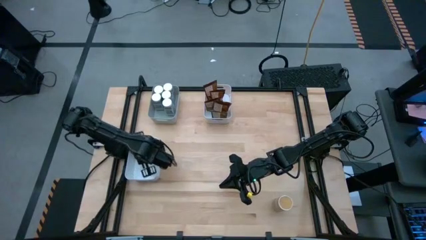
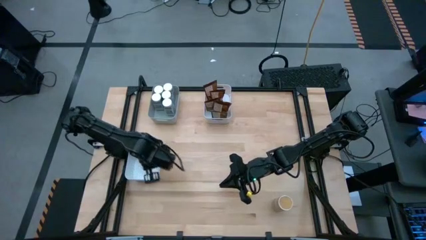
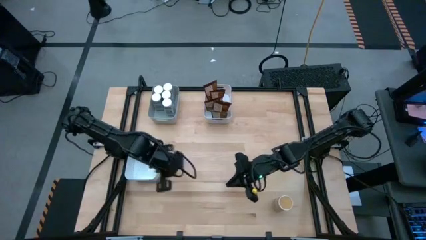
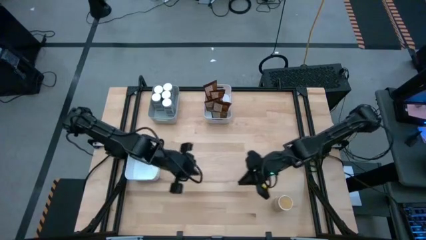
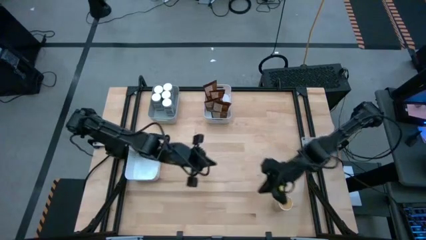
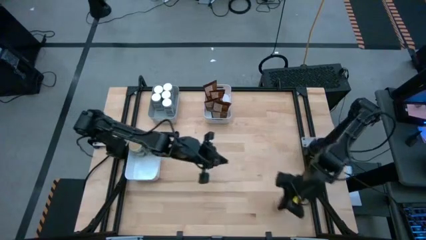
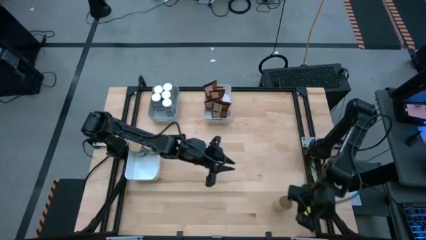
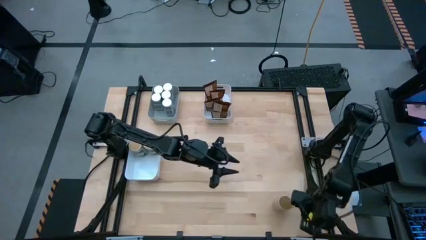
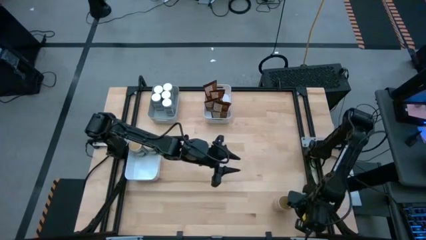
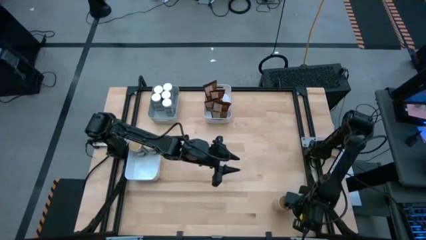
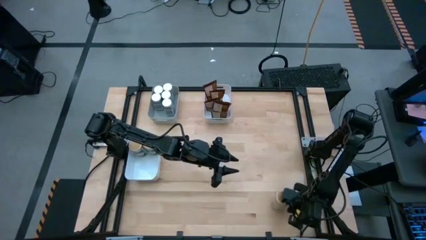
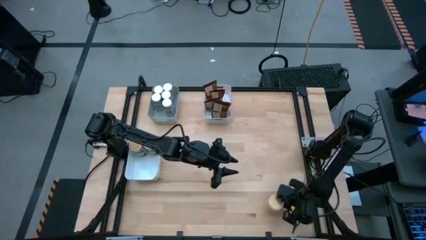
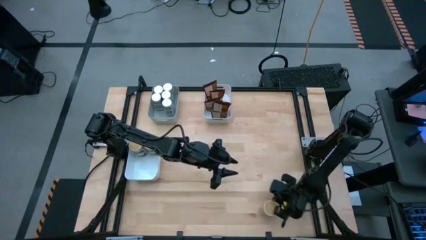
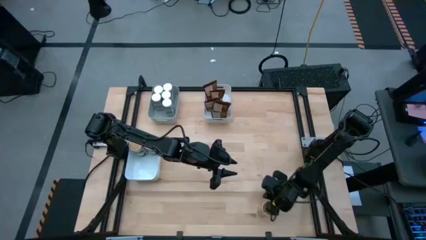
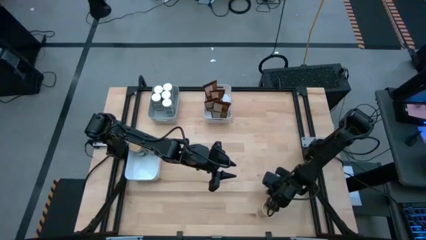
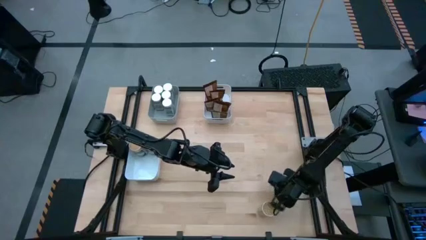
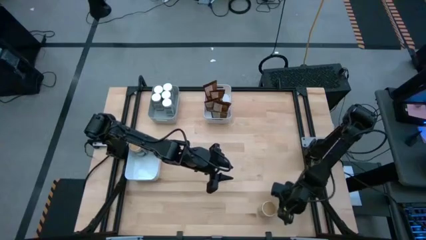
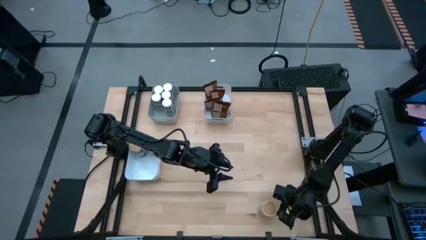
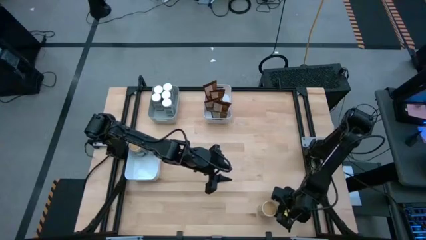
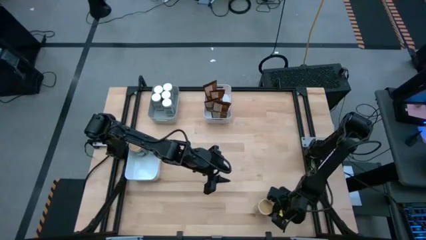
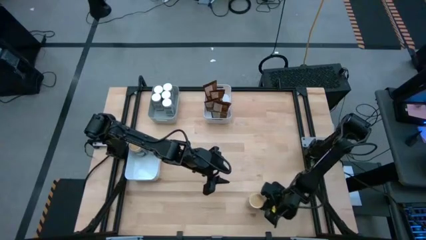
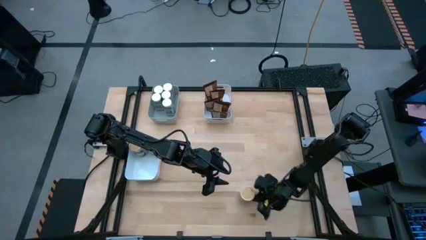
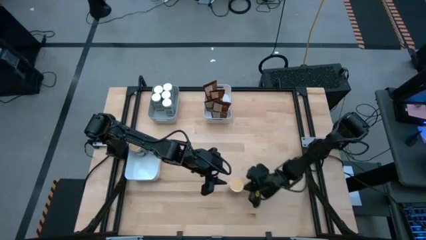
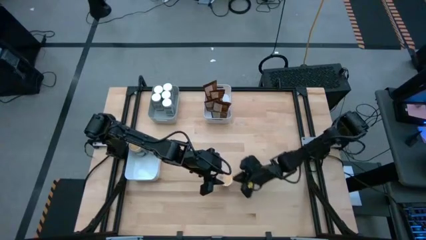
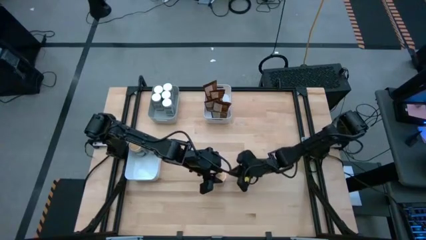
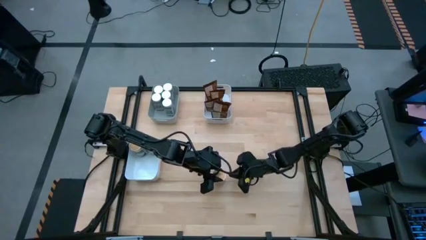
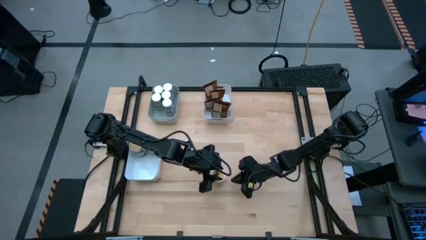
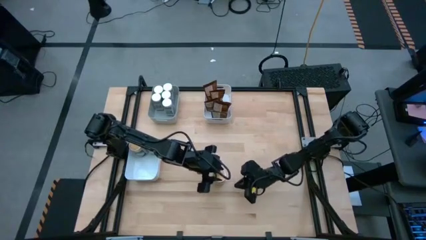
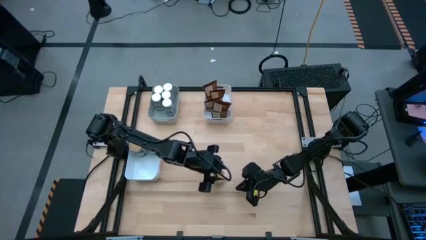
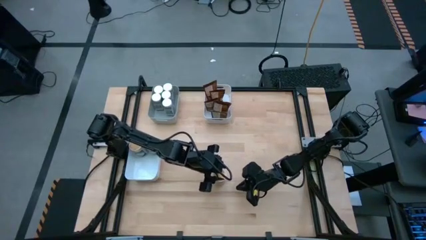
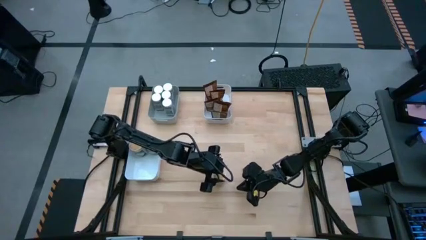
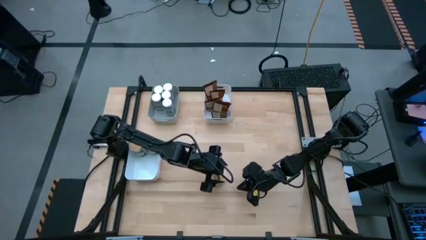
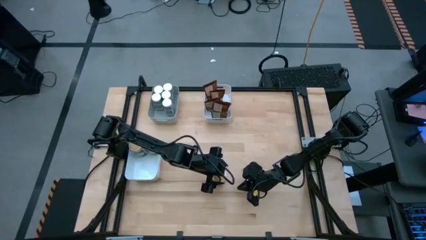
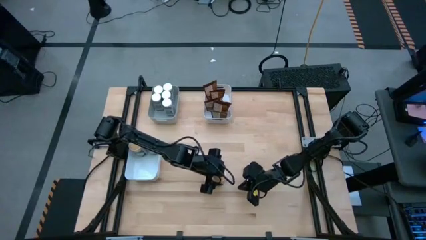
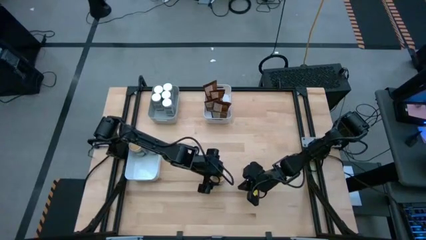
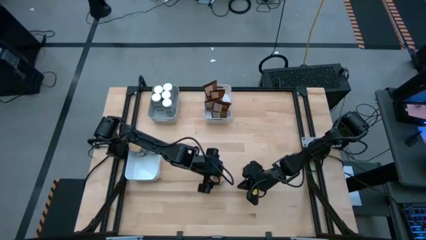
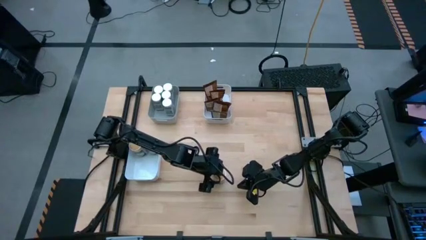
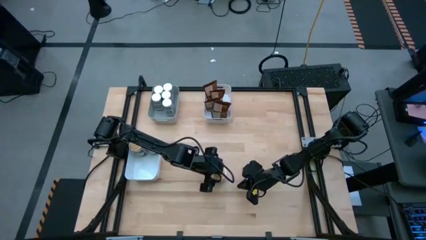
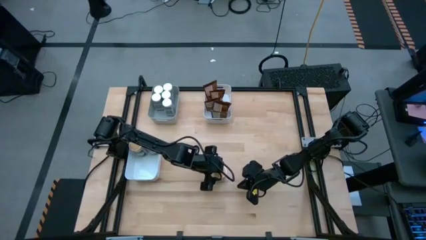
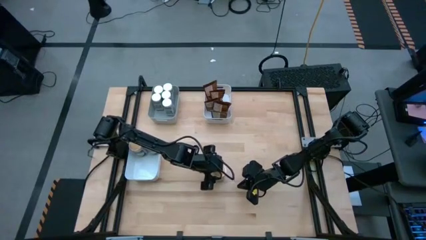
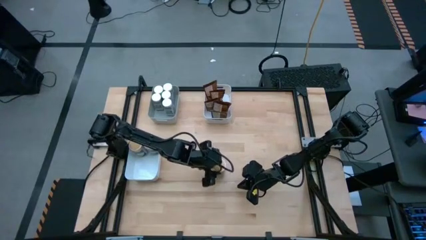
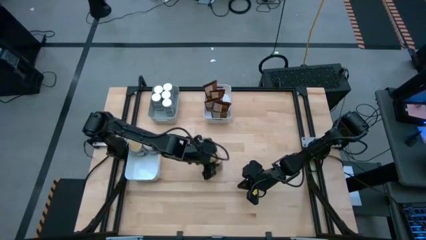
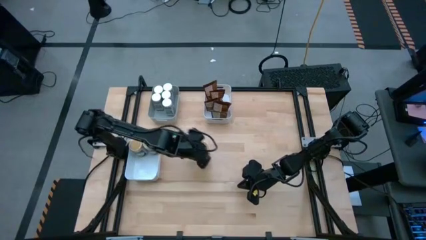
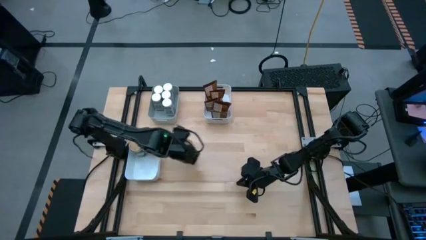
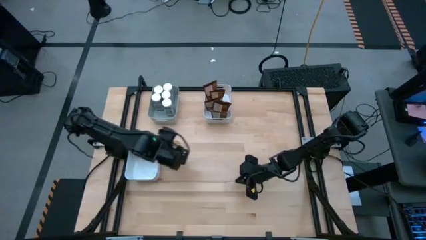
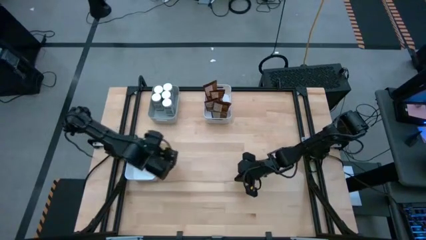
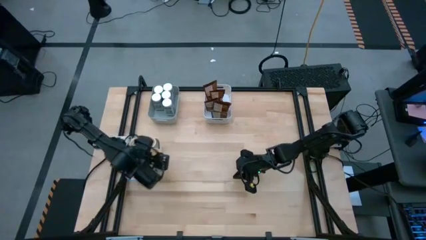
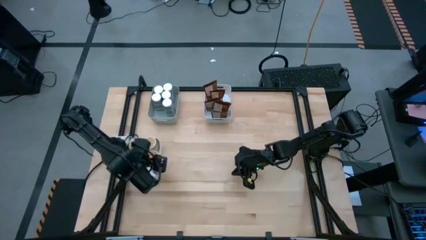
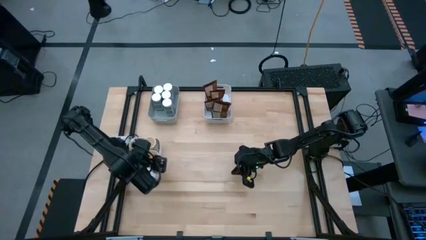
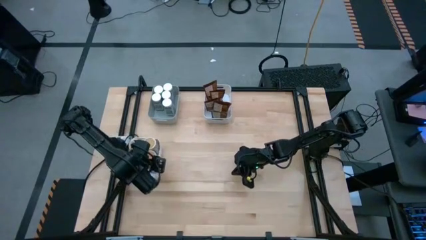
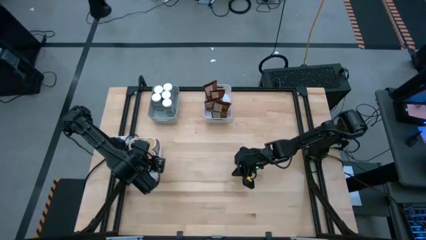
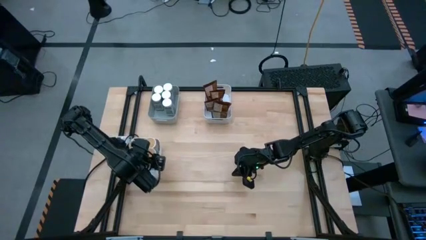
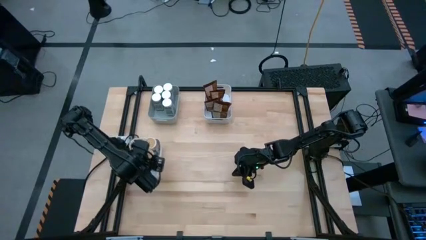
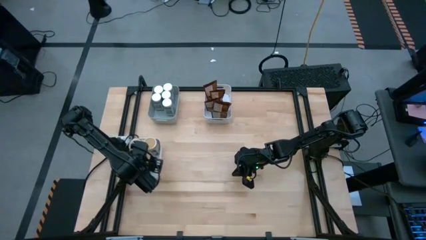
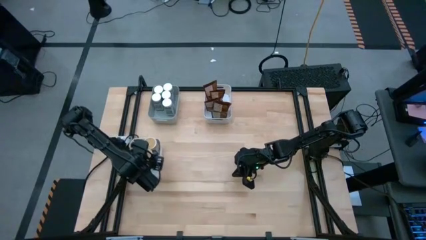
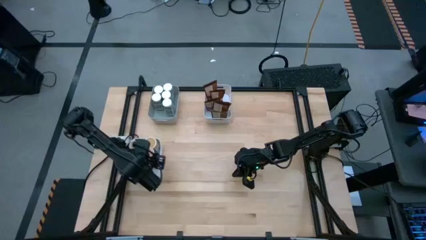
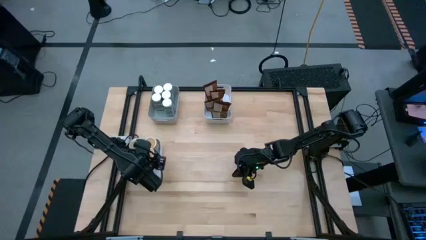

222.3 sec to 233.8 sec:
Task: Sort spices by type
Put the gold seasoning bottle into the bottom white bin

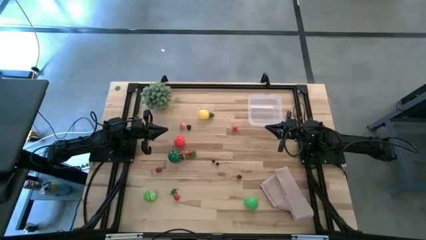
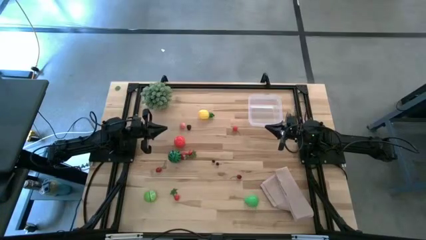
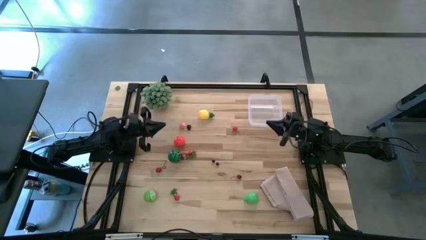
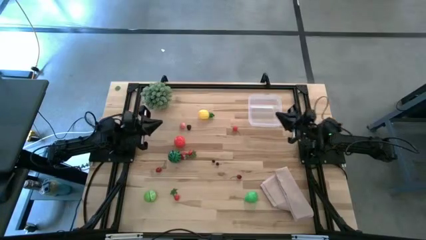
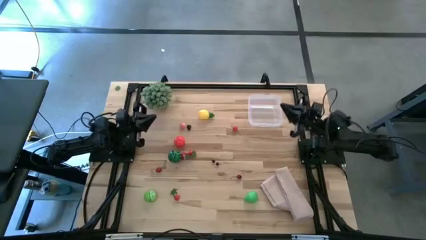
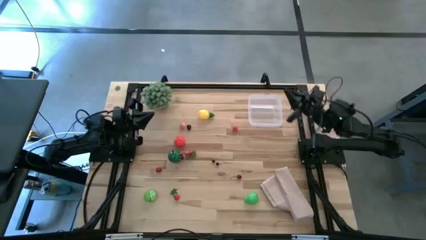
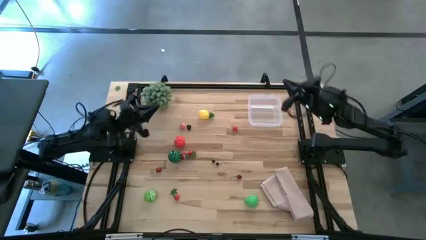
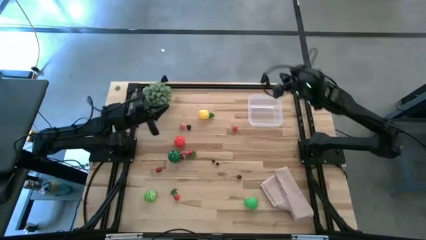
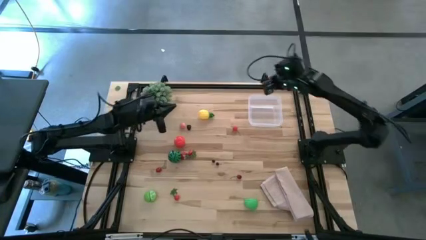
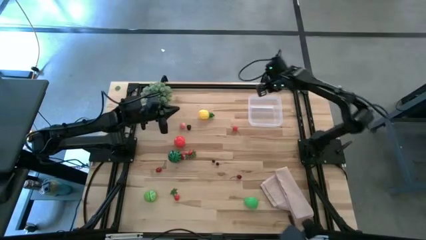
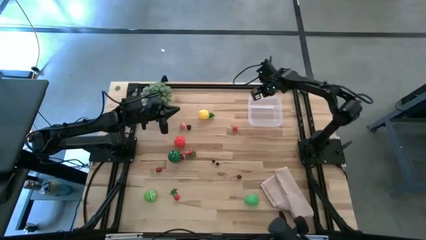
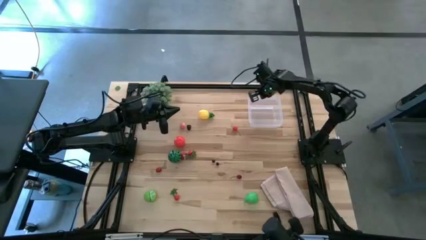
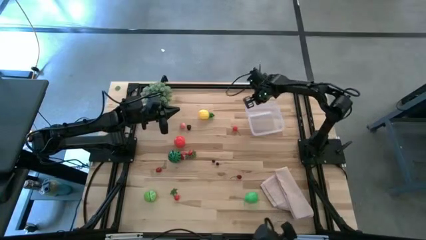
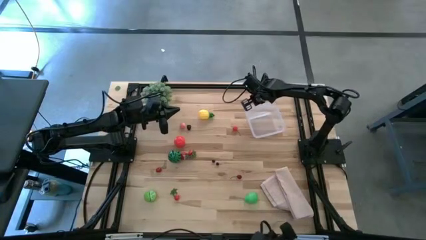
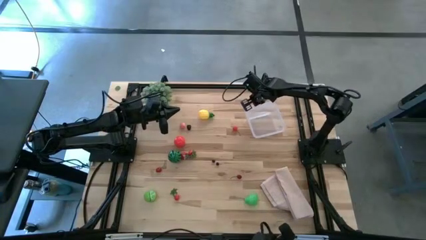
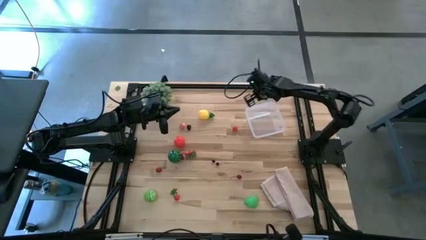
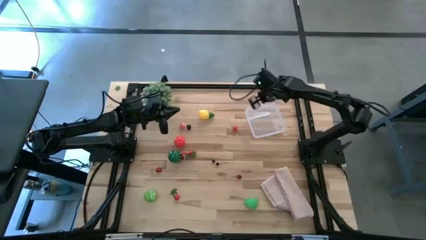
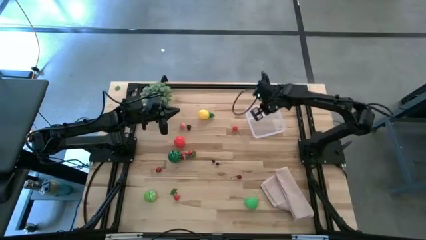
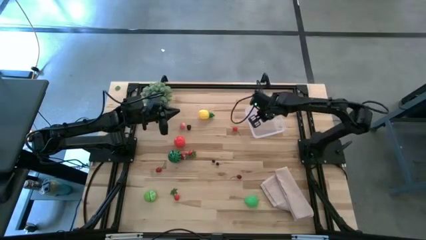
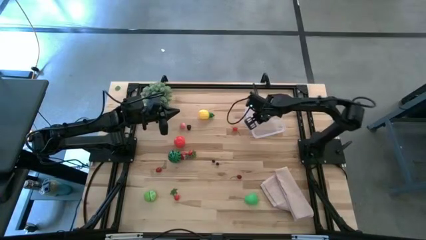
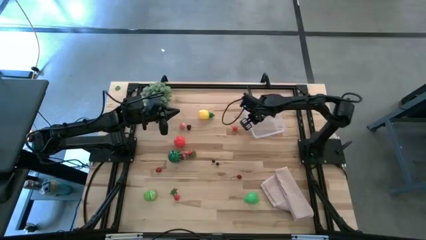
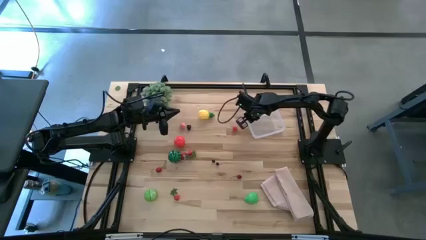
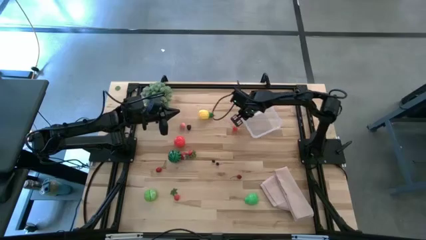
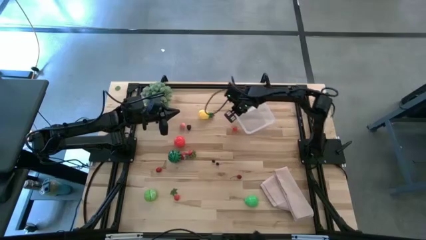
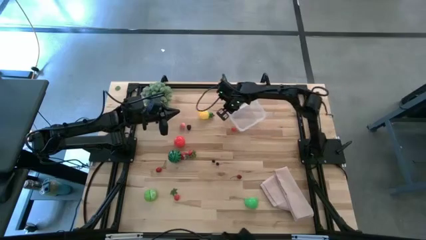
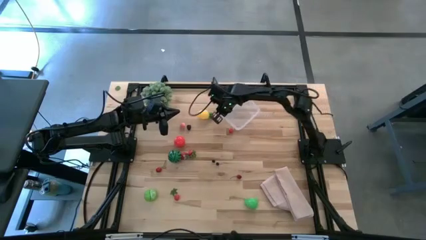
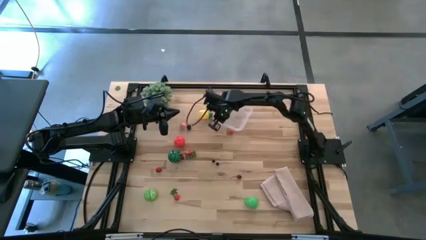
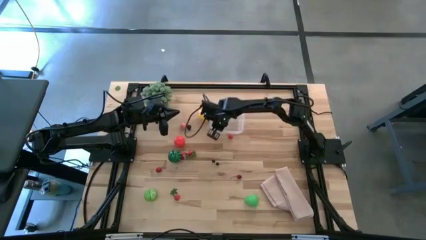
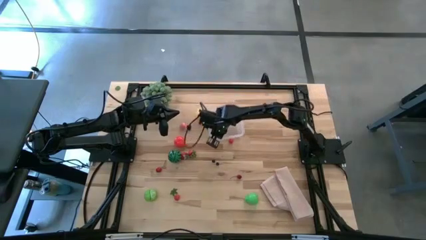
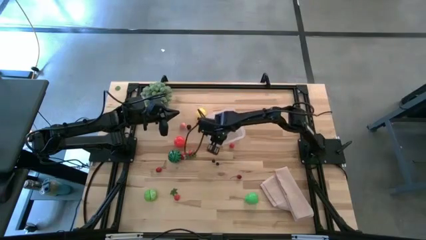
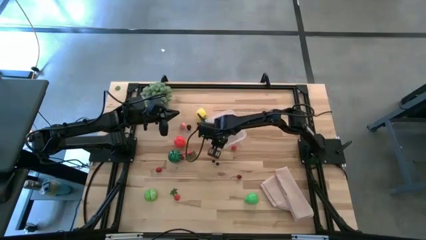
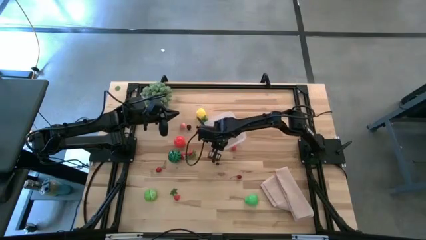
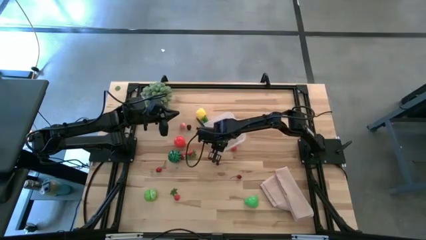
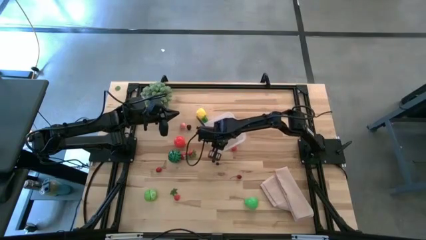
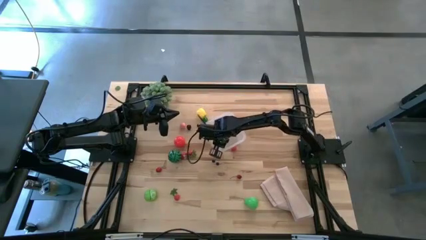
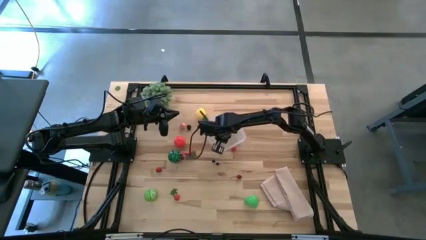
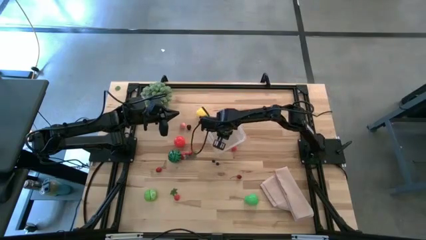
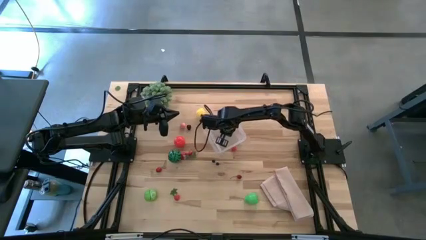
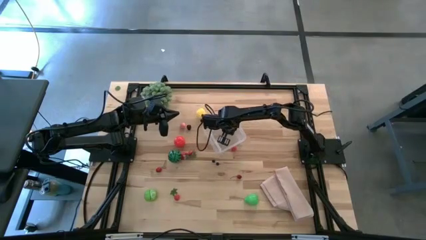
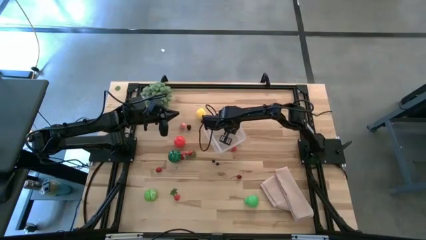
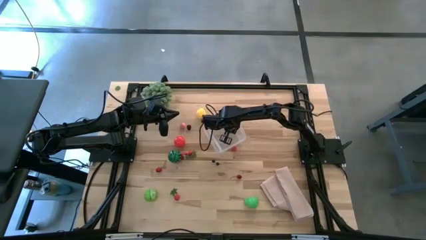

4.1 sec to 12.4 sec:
Task: Pick and placing Produce into tupperware
Move the transparent bin to the center of the table
